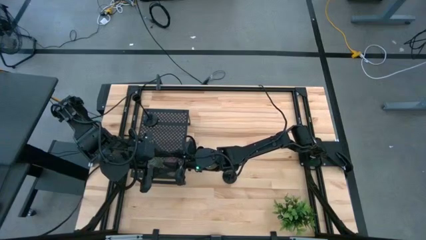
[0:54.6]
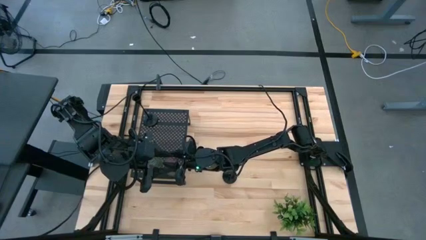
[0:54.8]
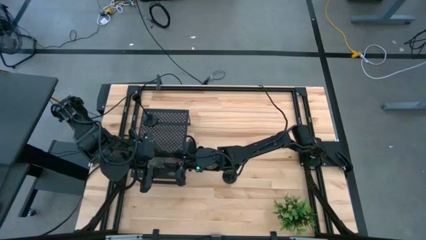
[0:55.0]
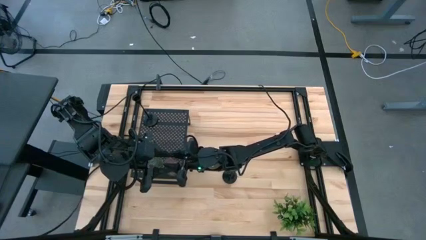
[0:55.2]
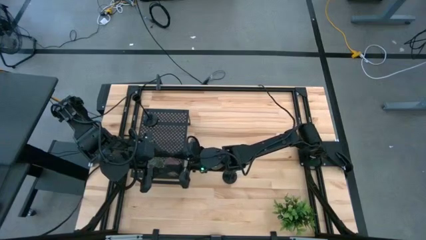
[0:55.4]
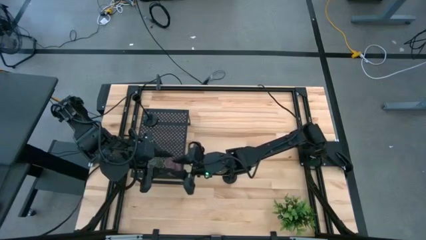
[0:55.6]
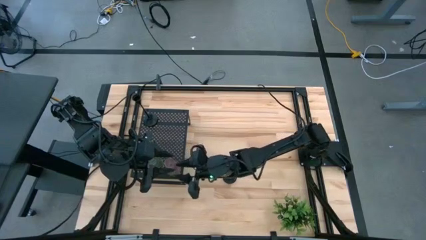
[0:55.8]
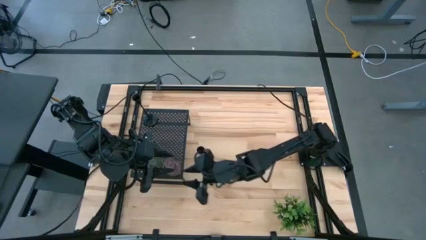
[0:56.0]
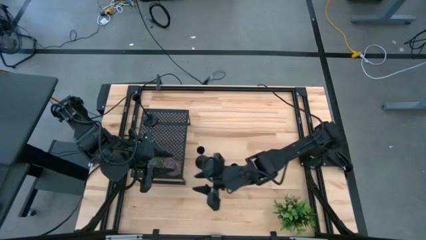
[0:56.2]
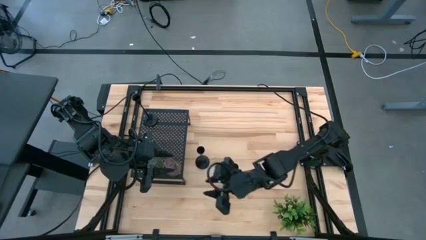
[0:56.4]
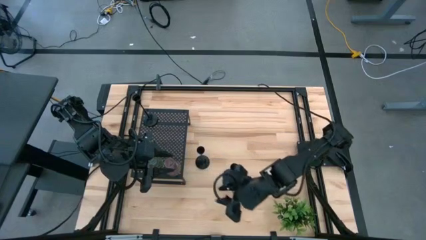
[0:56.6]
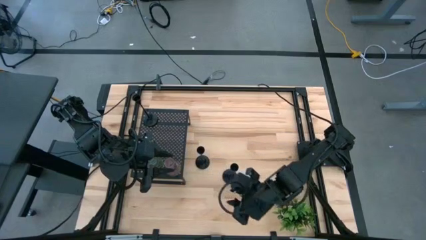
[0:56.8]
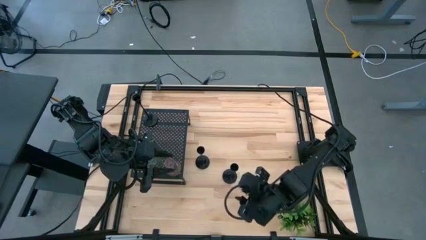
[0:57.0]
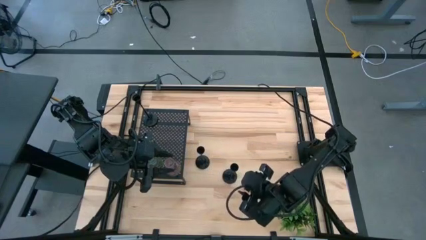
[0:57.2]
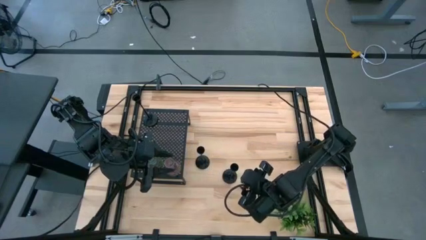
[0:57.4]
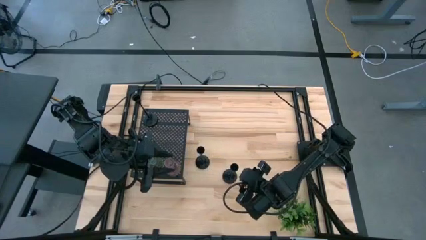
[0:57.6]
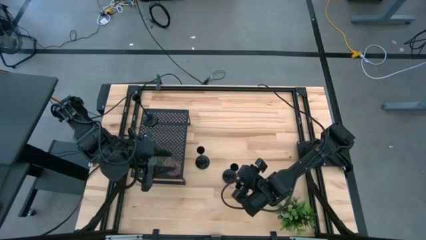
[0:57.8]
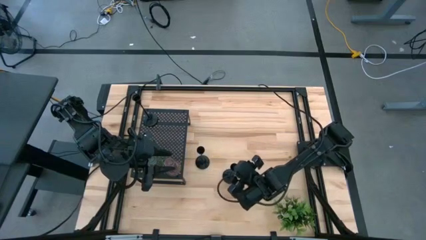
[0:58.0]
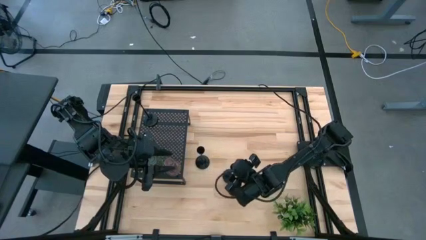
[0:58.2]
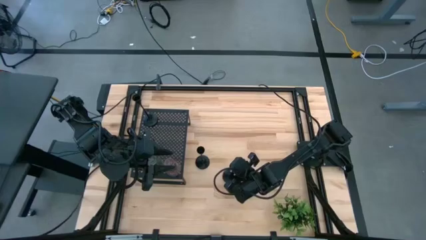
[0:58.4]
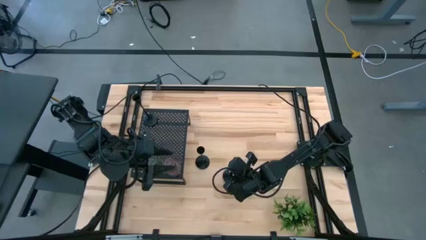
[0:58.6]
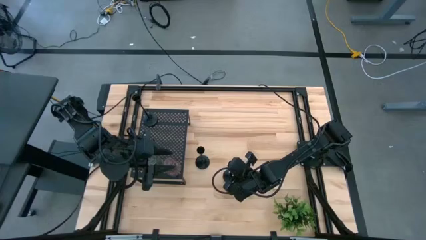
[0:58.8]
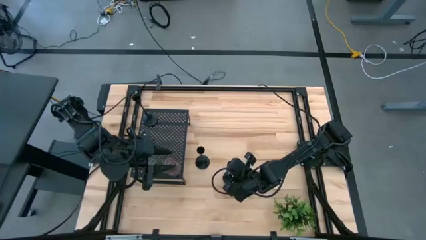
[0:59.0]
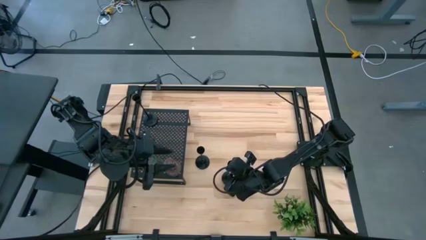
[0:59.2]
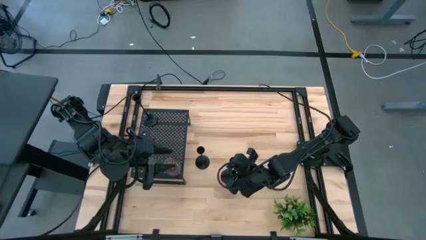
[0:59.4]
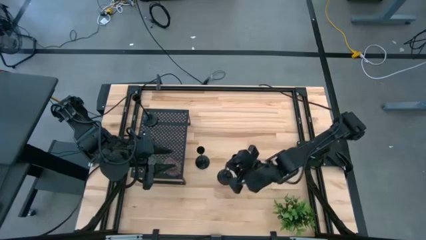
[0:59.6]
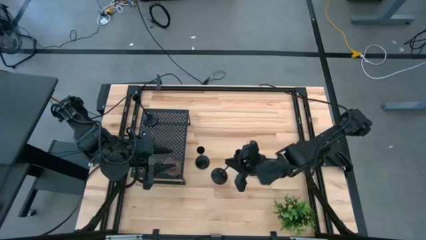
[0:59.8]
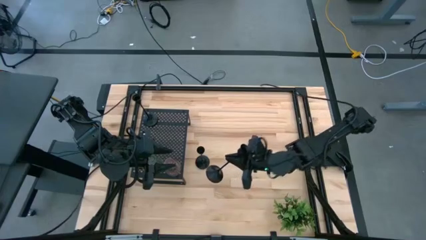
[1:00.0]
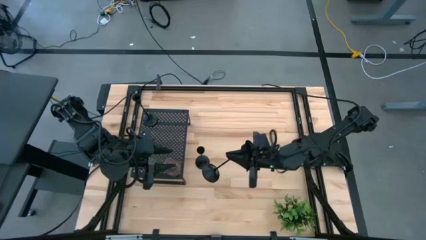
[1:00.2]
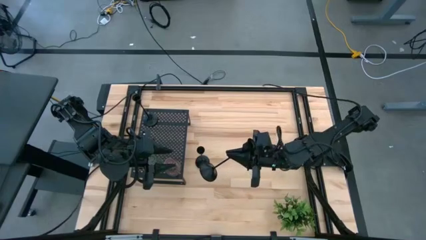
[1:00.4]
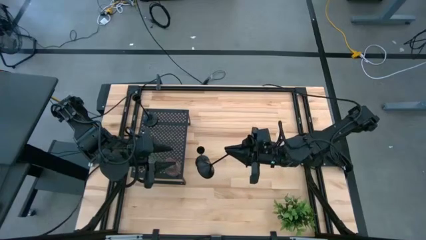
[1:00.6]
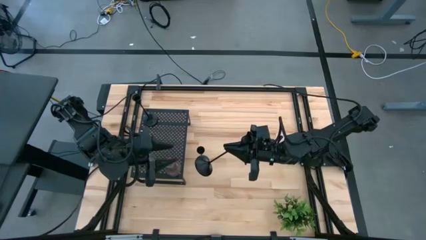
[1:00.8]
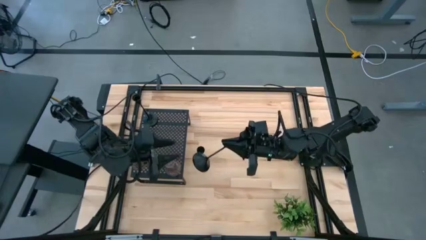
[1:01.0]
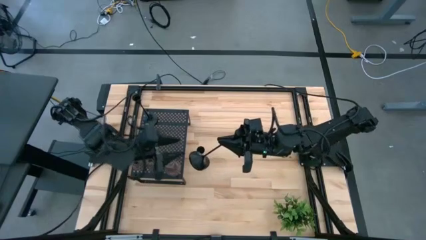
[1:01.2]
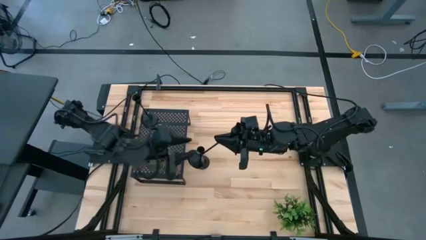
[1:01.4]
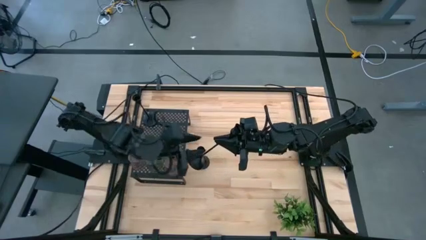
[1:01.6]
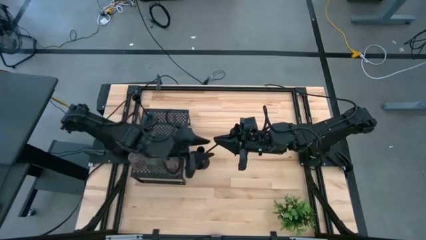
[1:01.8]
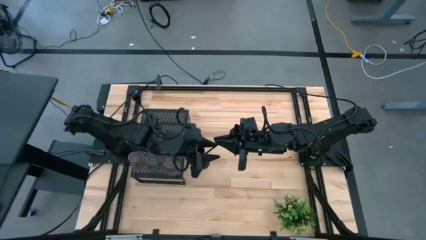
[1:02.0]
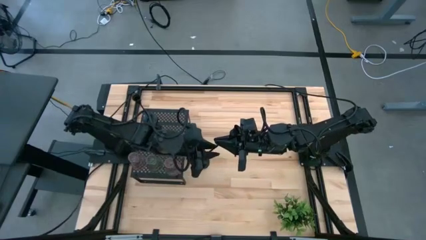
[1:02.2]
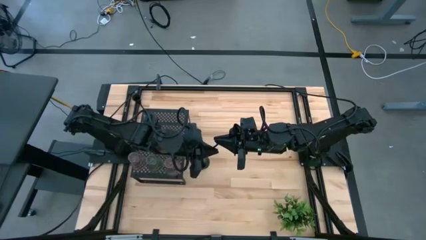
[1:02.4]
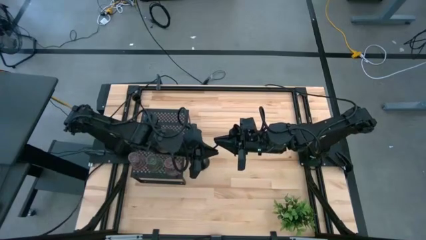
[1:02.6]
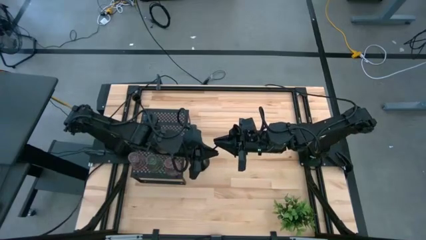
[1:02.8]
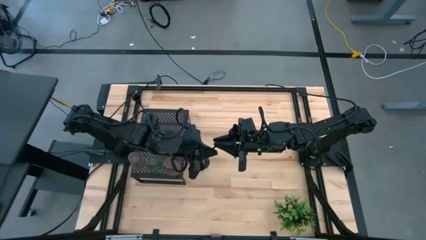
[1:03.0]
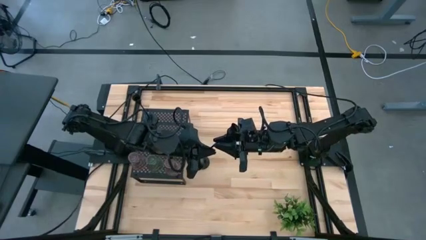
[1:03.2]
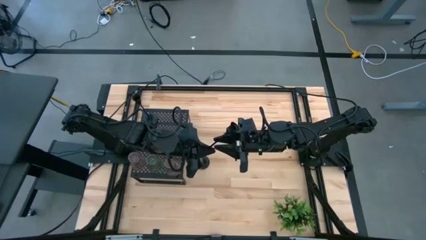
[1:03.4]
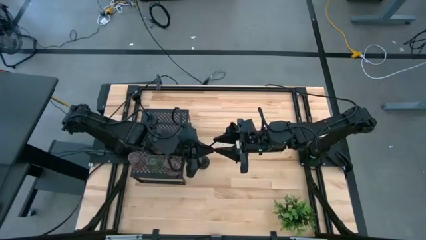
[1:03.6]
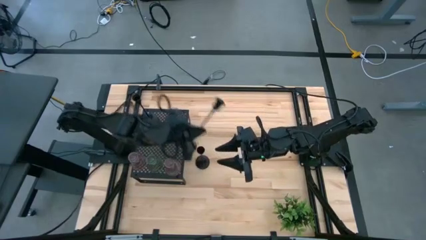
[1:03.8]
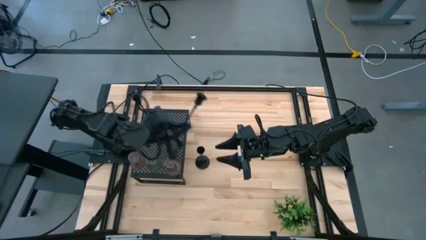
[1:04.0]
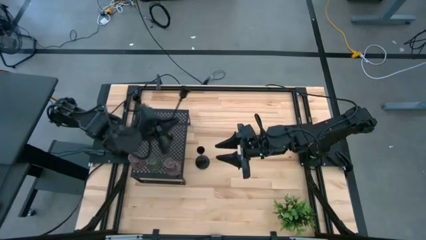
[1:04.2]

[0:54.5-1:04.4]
Task: Pick & Place candle stick holders
Put the right black candle holder on the shelf

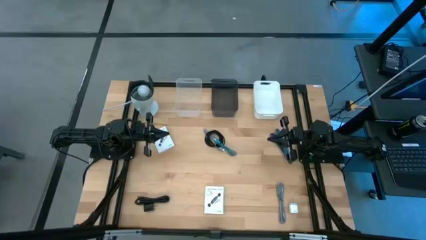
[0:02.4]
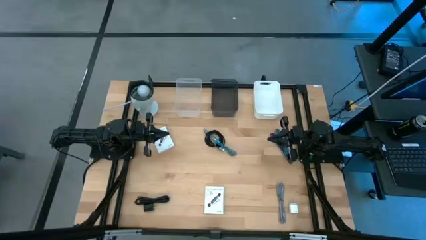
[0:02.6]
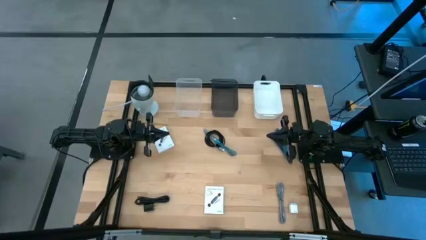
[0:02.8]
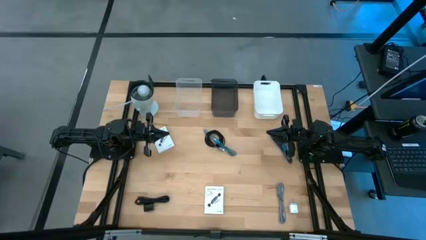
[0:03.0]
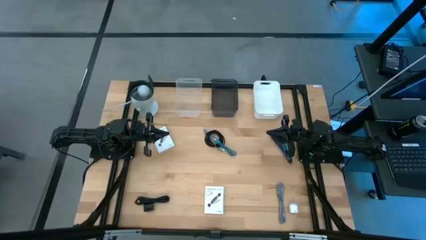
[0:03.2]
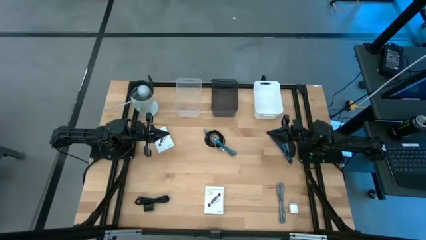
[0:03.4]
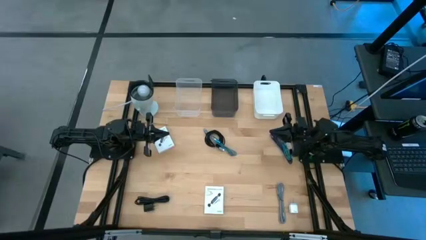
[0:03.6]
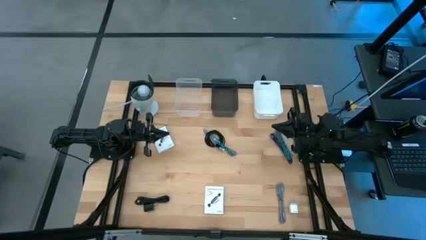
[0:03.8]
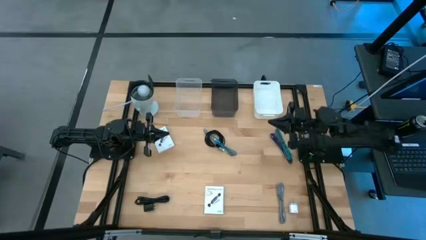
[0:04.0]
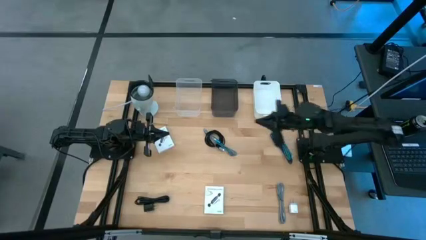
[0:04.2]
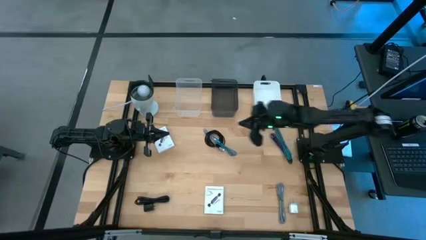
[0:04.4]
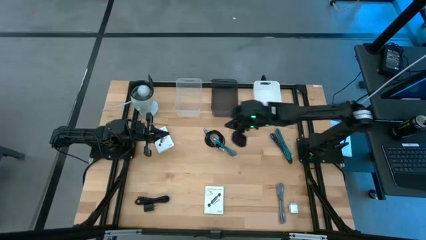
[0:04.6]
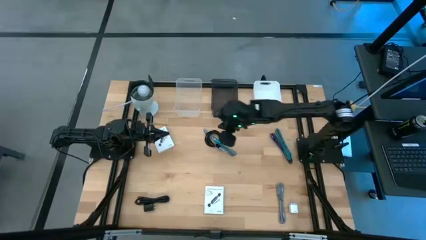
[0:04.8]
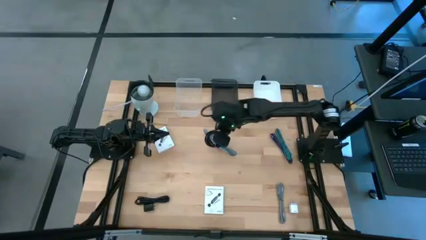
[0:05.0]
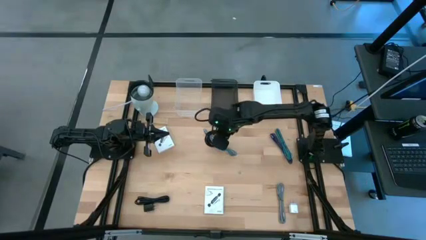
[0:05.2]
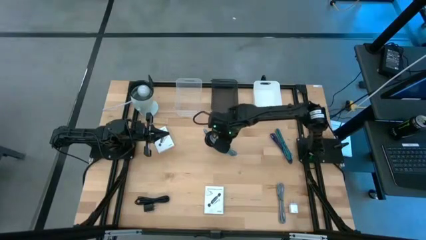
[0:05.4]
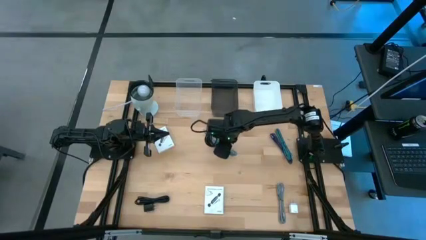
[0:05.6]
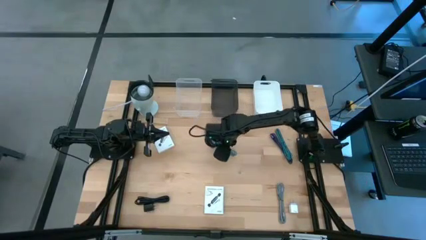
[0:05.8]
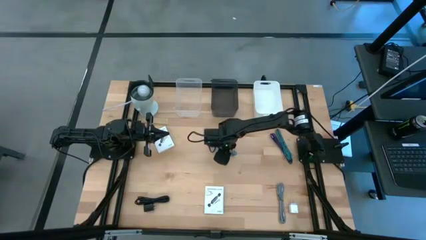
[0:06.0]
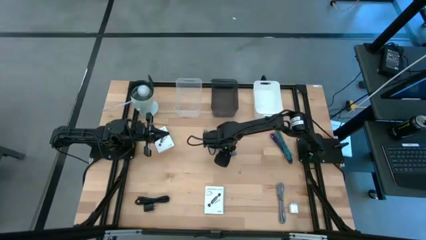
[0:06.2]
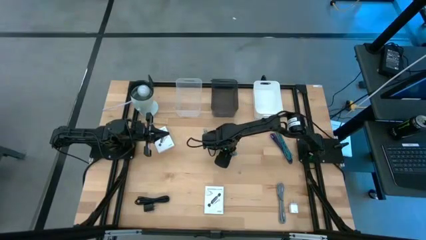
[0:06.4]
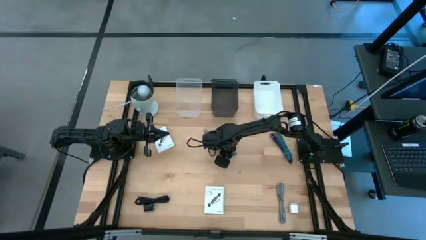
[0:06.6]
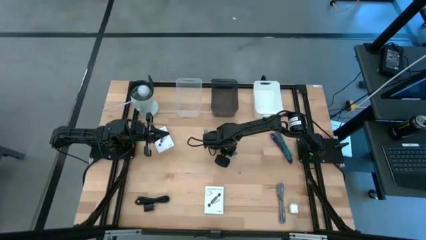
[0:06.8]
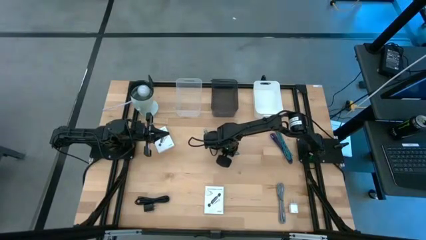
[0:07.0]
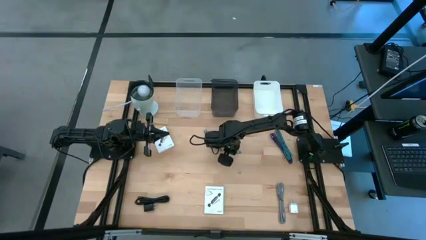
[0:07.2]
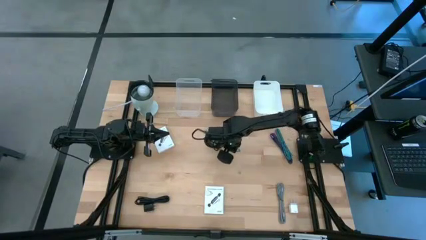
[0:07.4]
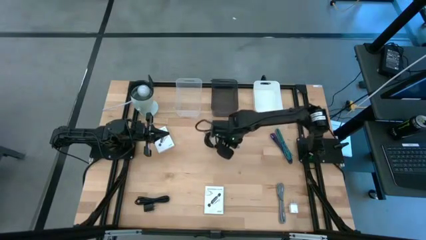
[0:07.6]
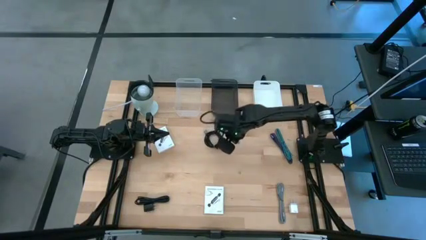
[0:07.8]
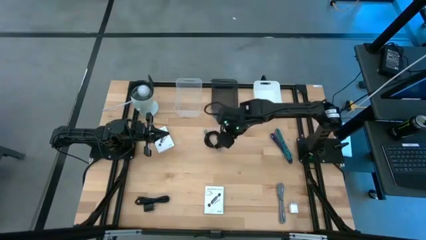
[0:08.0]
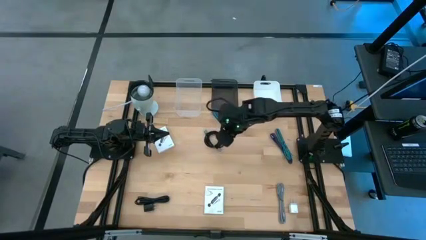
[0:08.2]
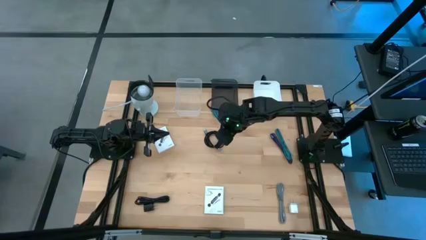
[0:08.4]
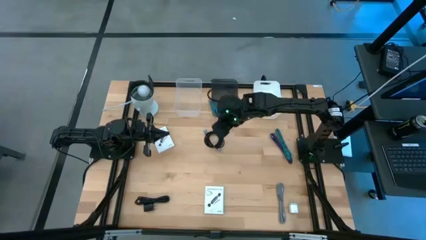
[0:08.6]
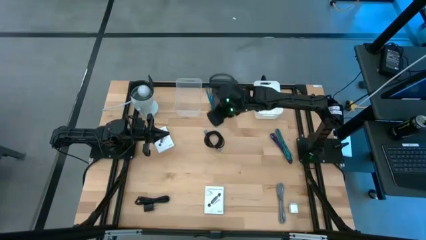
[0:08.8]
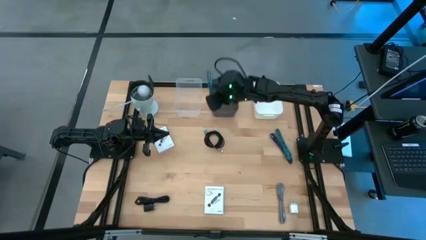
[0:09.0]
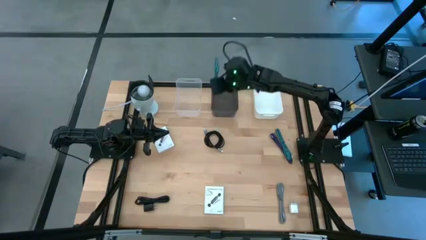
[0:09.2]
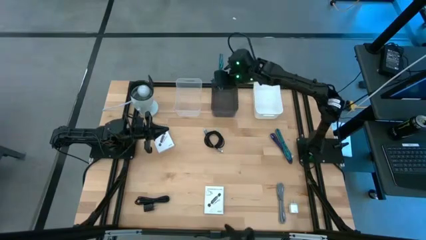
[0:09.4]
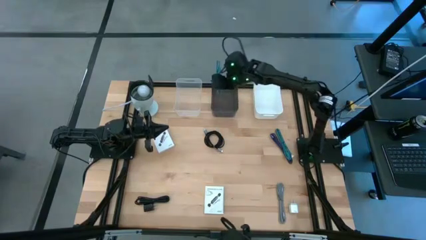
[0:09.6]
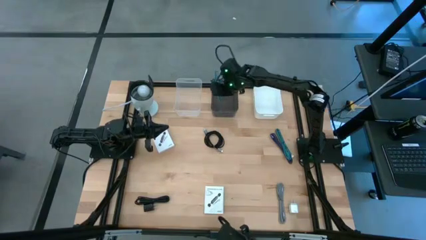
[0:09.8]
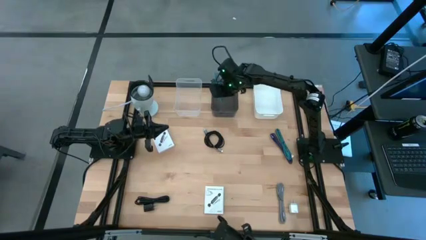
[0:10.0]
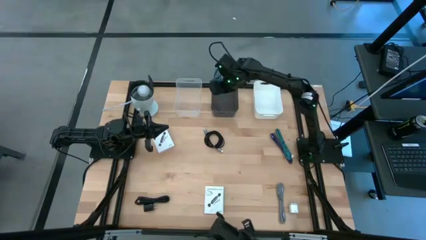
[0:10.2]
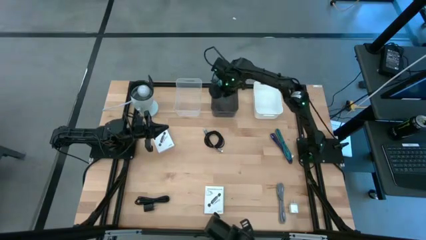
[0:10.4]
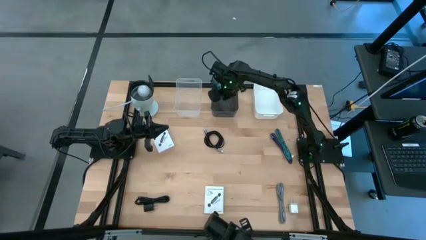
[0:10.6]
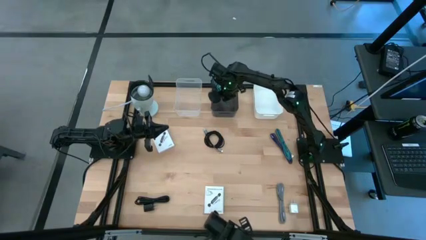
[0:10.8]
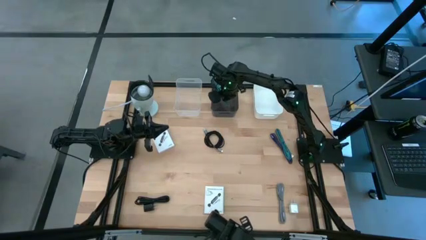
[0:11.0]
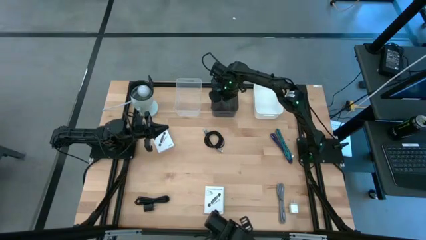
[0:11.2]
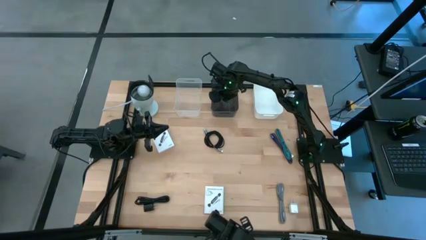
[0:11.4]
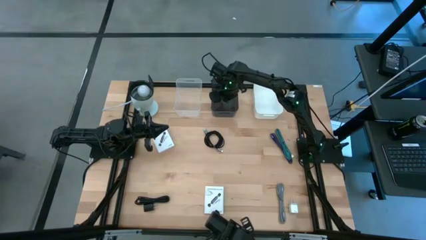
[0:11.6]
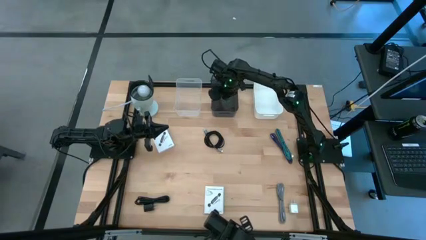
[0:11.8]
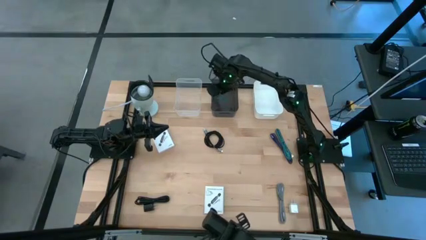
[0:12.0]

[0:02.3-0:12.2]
Task: Pick and place items into bin
Put the left blue charger cable into the black bin
